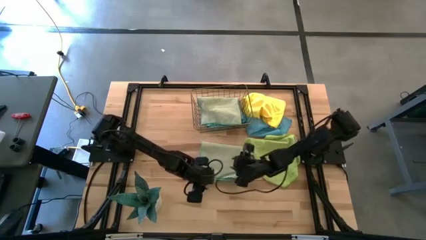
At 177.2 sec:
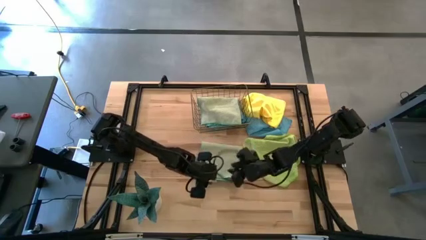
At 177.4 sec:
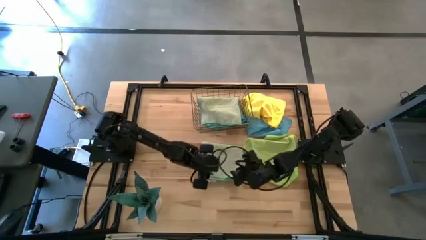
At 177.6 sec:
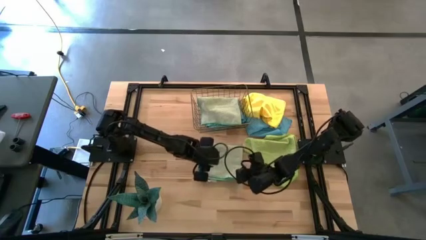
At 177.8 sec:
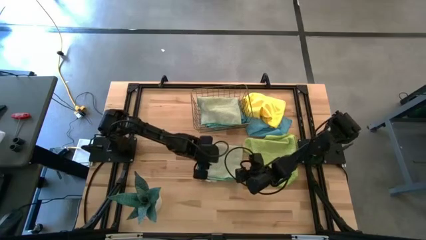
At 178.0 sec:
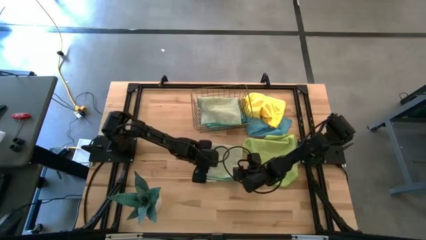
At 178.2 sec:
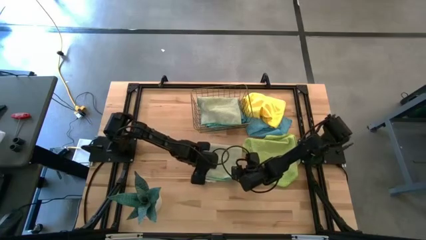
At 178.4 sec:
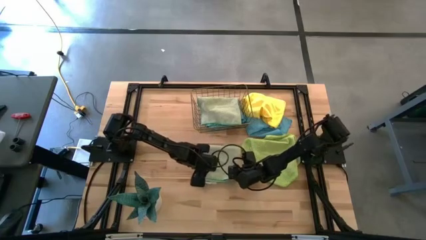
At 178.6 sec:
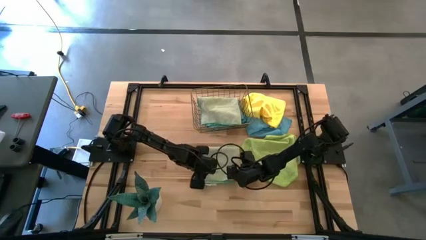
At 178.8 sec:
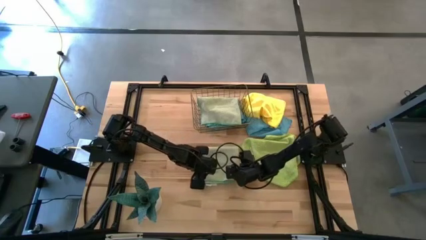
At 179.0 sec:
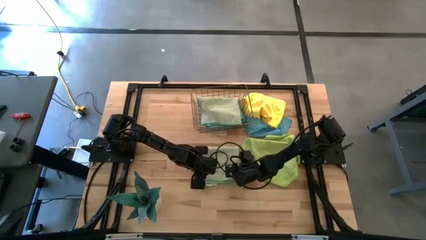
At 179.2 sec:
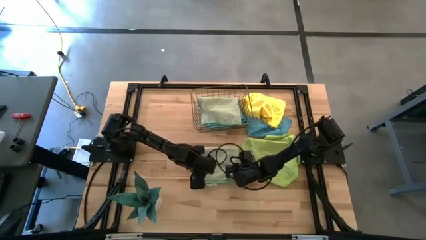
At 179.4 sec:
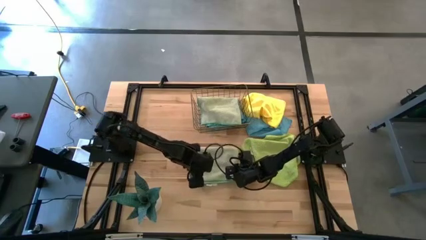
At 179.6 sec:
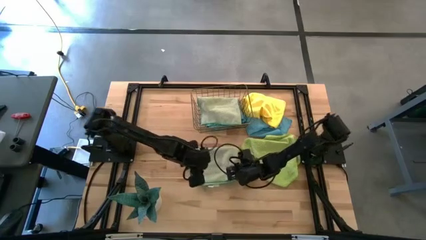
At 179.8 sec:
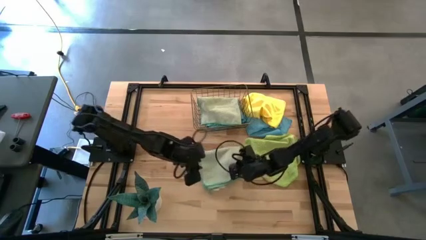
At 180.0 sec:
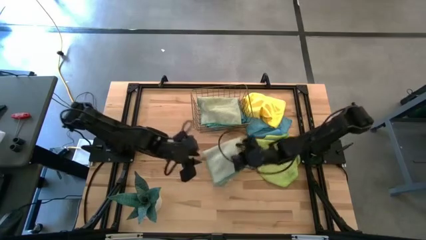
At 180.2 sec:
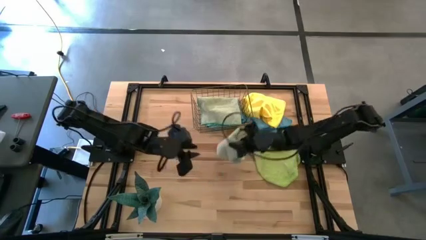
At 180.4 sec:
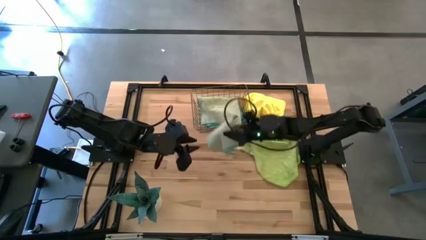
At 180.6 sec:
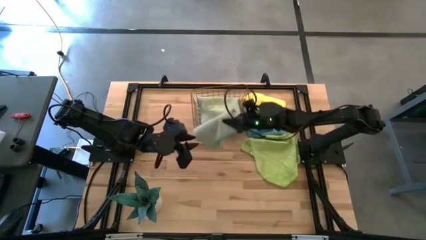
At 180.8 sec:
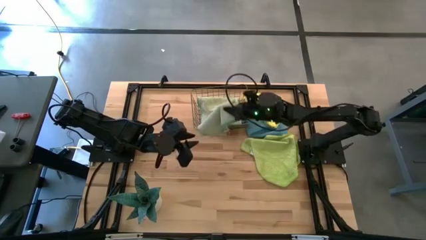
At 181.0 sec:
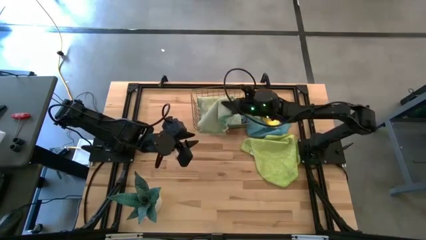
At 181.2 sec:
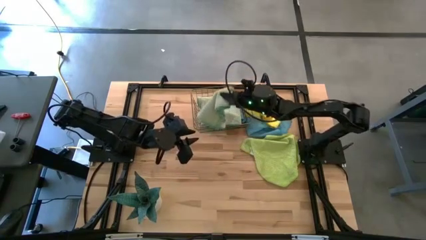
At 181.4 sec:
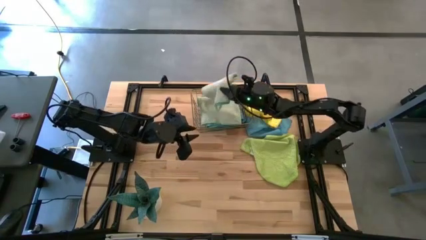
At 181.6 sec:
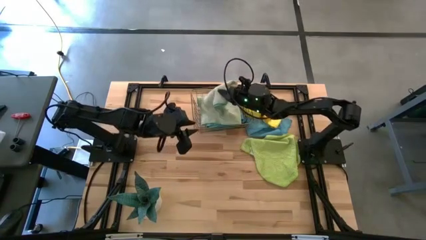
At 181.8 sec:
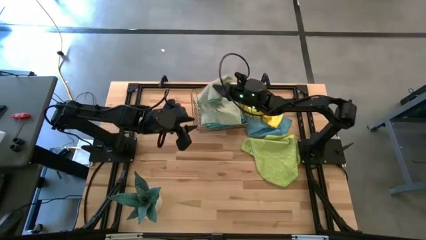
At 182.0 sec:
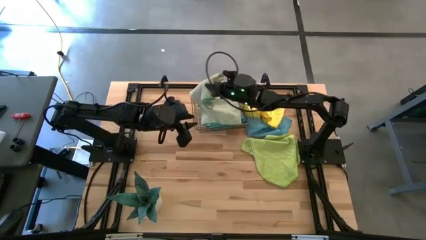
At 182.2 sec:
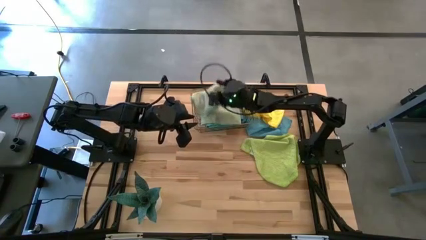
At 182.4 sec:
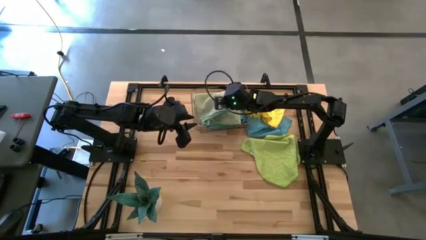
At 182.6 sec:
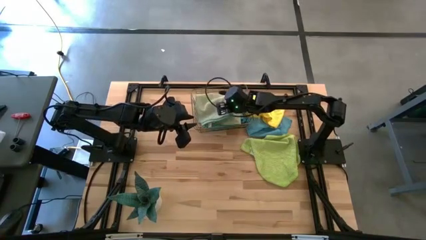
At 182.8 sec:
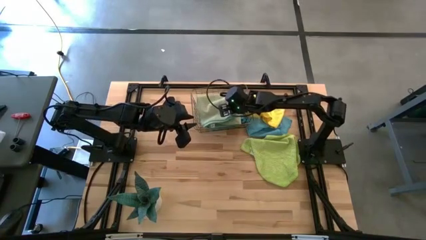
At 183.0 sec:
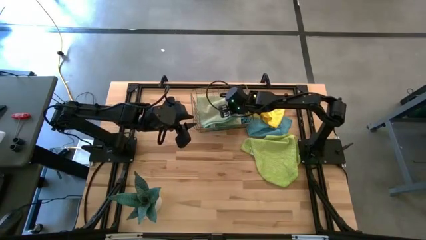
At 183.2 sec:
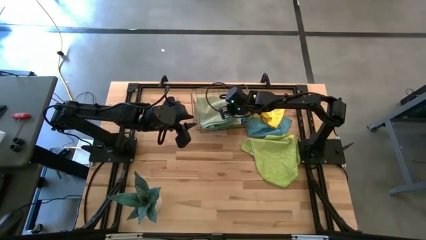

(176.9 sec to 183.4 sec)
Task: Fold microfiber towels
Stack the light green towel on top of the stacked towels into the wire basket

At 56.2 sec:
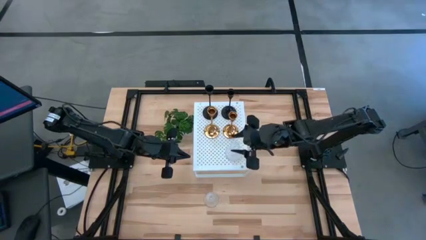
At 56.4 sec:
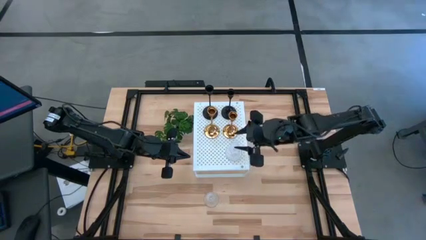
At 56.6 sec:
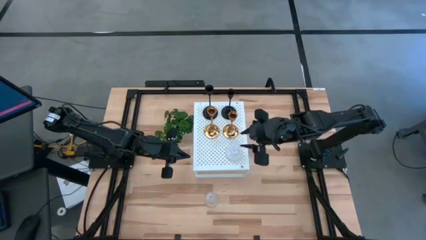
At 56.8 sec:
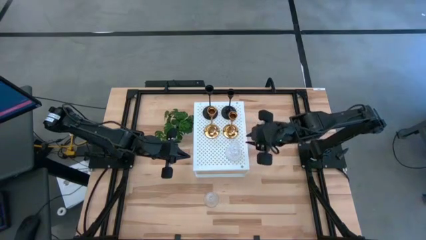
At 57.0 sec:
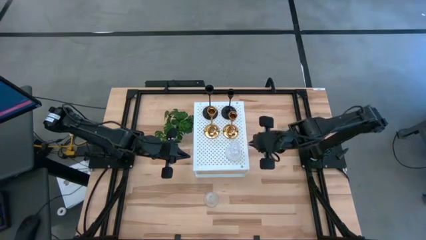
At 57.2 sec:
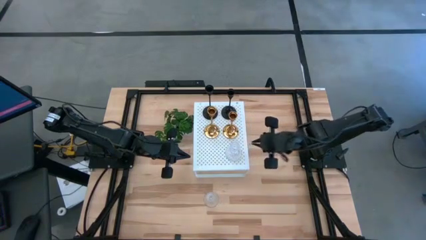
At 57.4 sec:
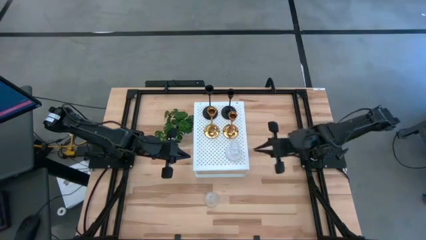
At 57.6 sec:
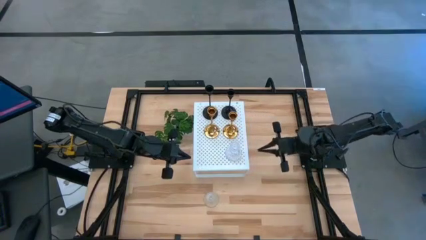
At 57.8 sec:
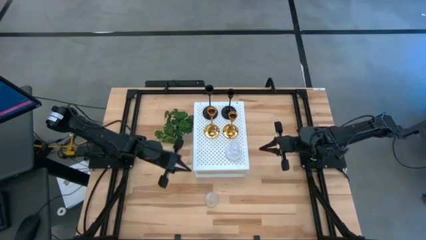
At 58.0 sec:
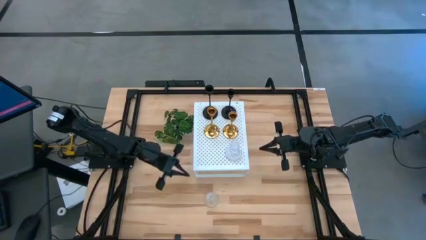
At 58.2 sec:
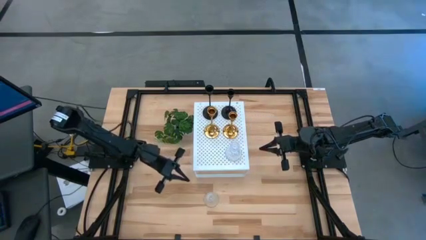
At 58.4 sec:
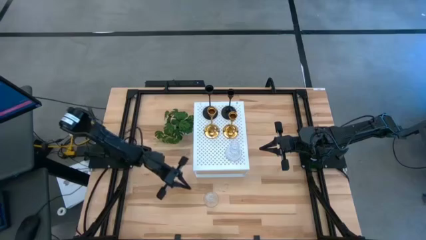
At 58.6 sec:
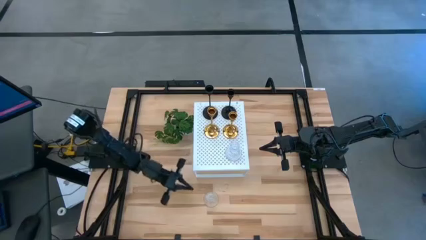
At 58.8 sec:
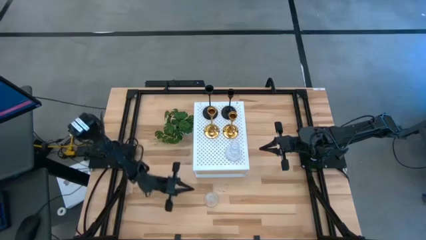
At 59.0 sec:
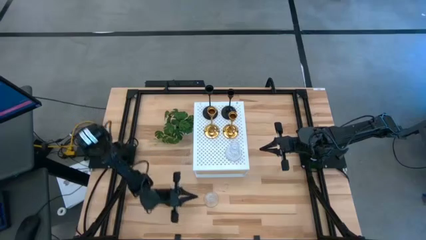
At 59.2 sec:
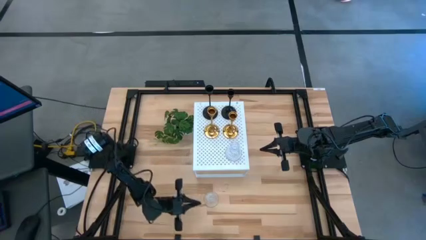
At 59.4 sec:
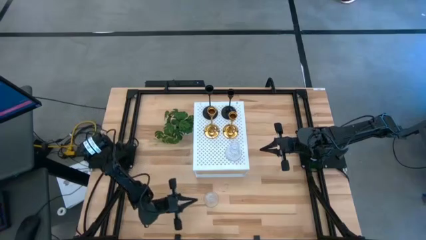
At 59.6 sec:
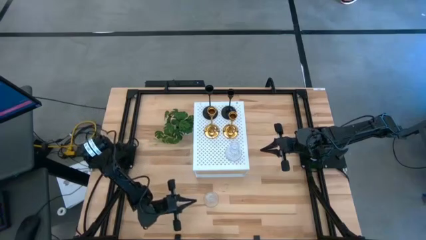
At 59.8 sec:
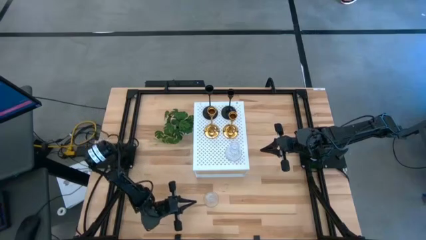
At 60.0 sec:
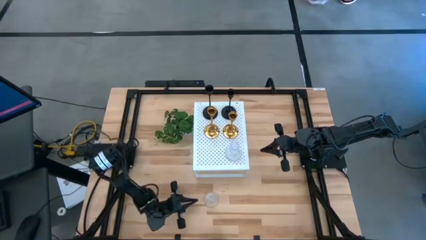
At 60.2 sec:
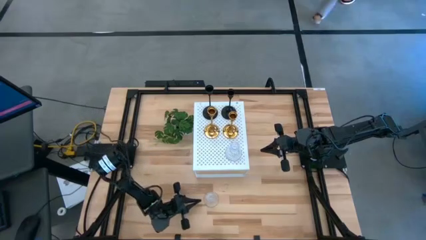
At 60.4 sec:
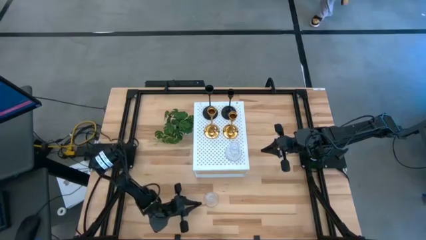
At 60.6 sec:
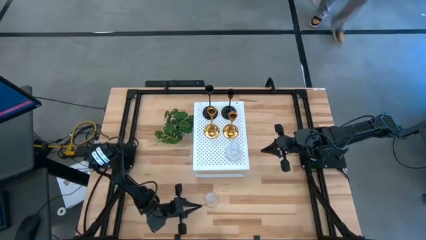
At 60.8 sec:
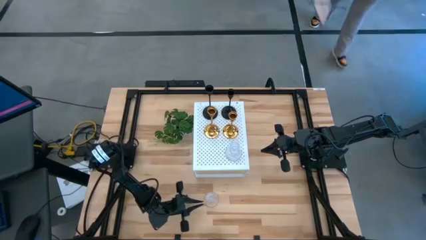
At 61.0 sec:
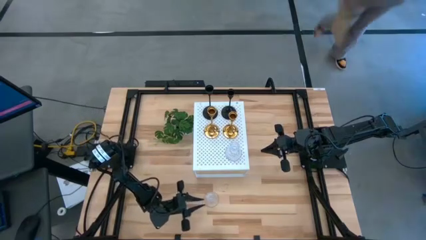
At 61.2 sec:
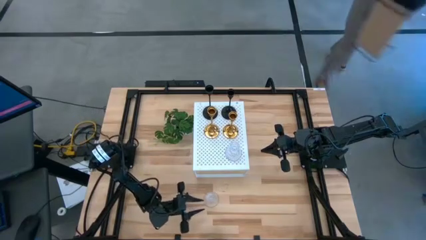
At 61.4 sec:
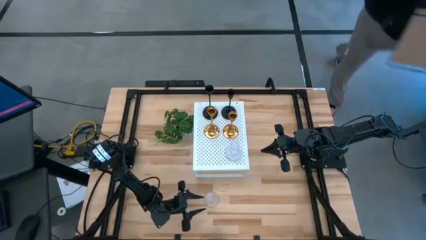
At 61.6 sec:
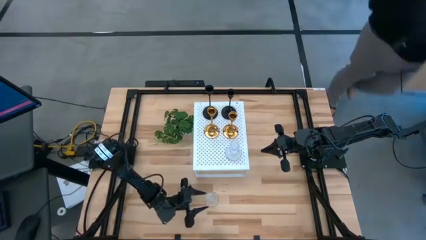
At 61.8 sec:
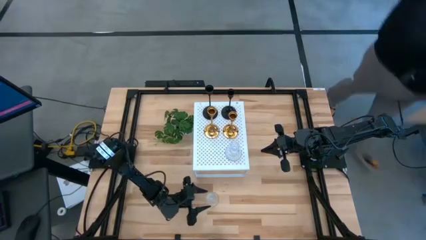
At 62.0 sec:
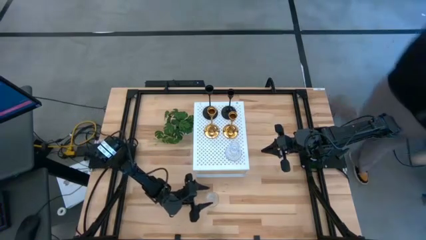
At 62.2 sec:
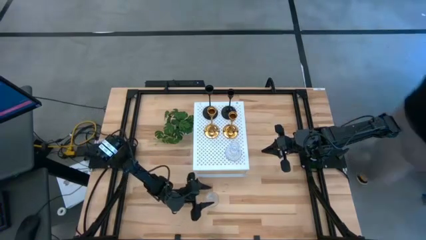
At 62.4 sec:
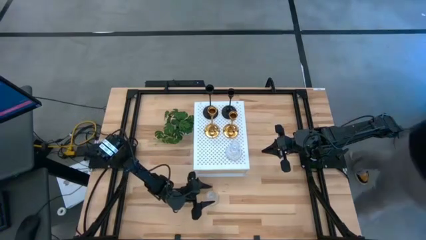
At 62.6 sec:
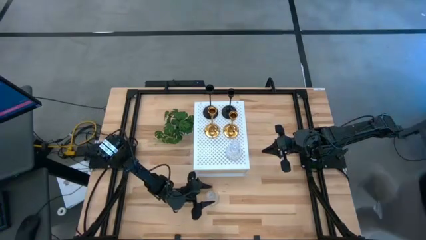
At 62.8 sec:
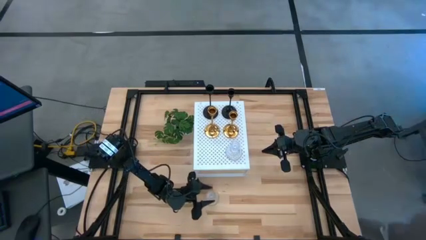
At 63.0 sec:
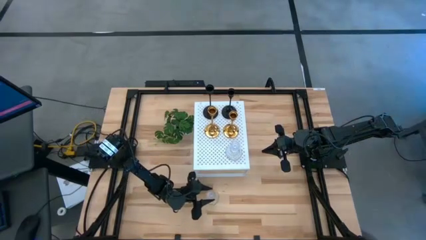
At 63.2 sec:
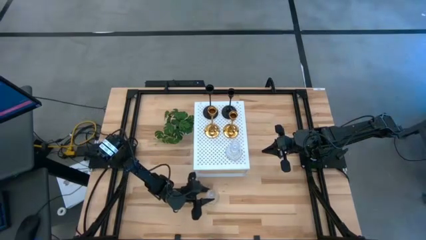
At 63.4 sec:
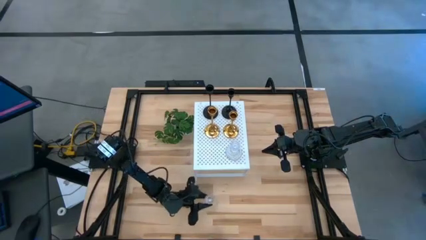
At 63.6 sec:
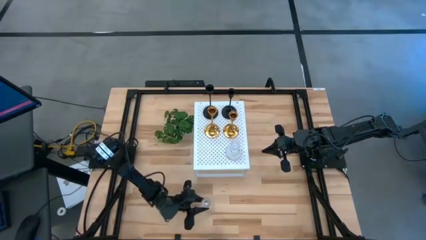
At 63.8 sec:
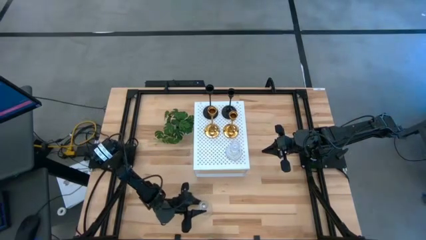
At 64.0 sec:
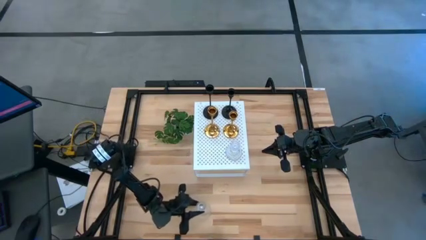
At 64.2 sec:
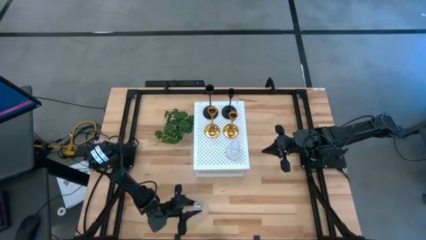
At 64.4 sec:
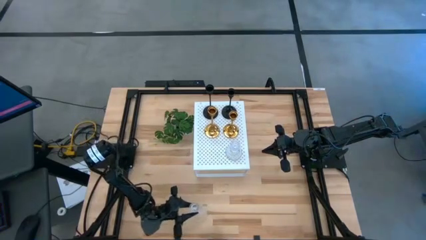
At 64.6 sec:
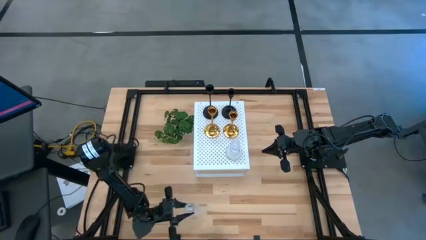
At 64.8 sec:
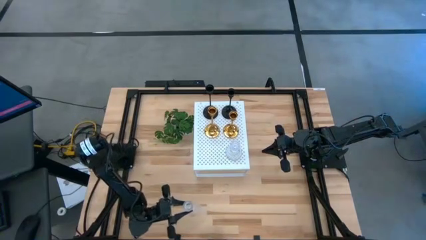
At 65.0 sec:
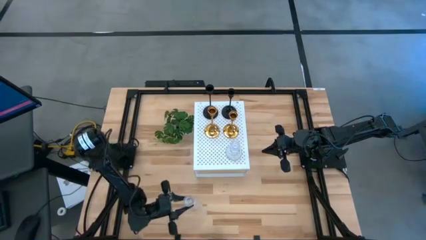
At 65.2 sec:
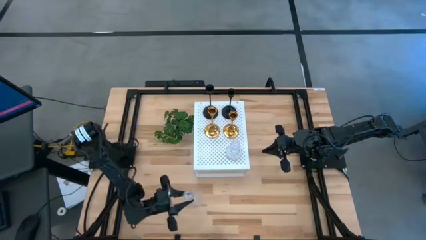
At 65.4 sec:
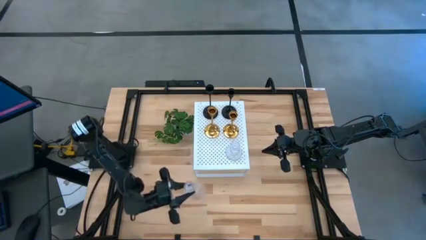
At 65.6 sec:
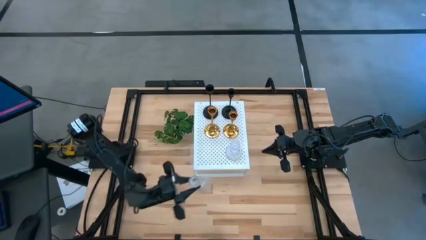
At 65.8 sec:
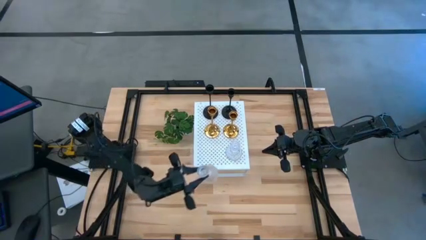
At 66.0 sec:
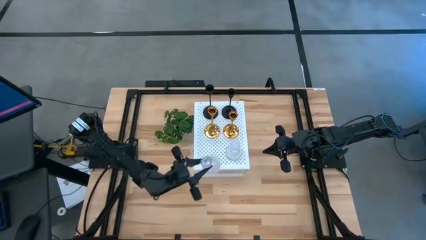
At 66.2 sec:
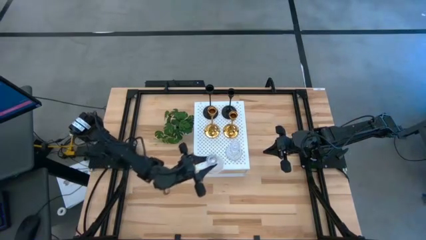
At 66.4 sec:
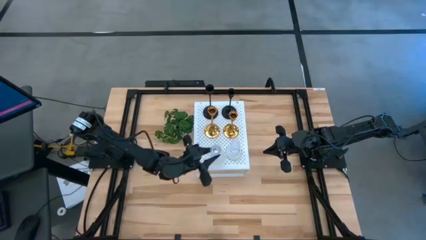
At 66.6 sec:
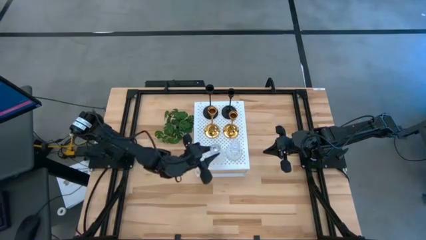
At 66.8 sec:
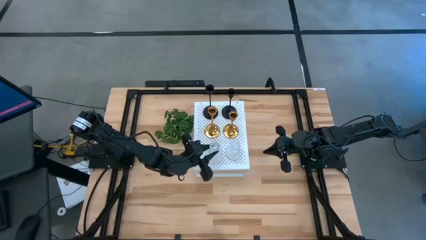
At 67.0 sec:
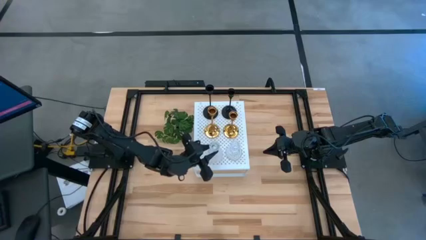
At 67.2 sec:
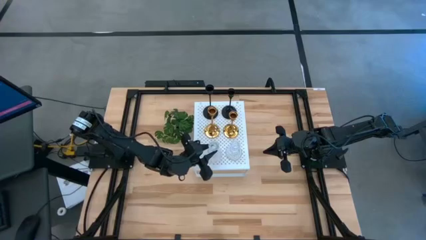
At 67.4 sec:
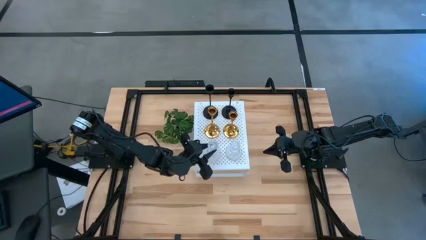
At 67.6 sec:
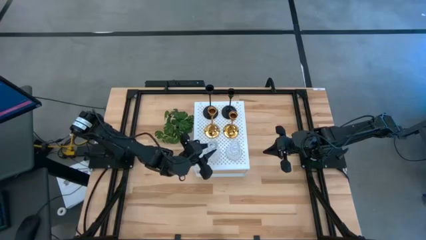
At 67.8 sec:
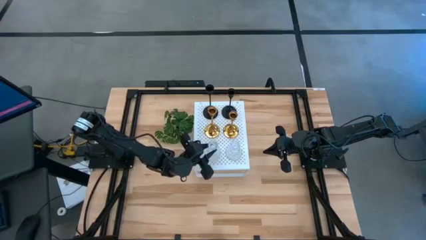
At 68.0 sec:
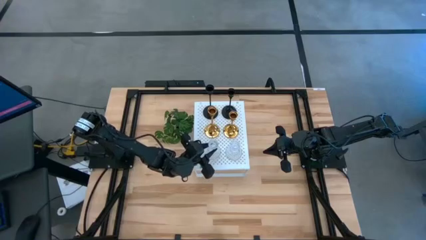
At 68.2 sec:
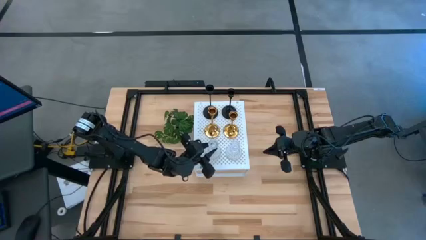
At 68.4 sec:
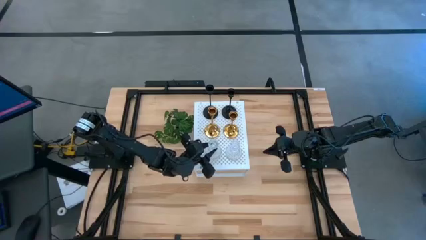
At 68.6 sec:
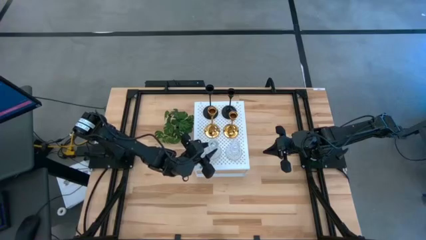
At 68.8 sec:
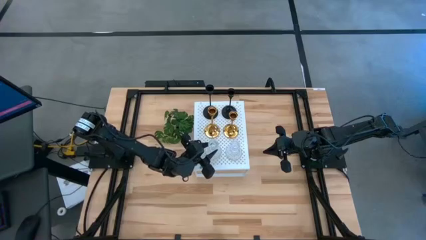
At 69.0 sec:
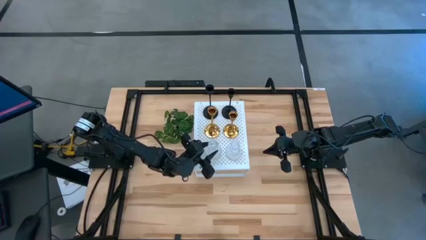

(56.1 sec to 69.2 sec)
Task: Pick & Place candle stick holders
Put the transparent glass candle holder on the shelf aligned with the other transparent glass candle holder
